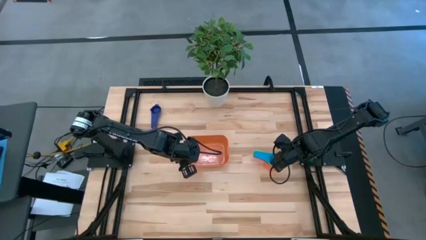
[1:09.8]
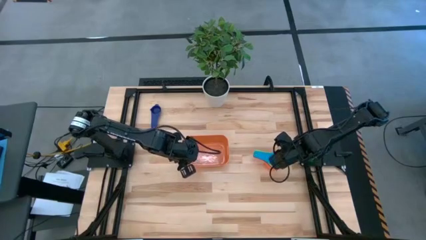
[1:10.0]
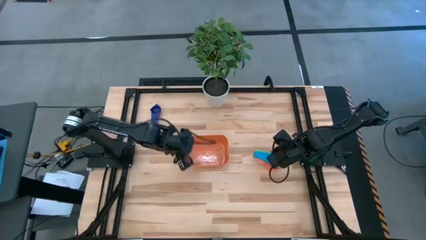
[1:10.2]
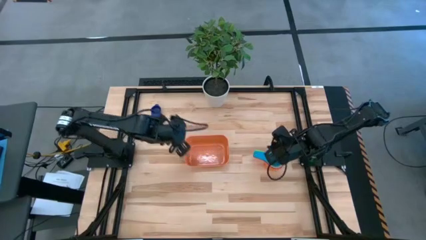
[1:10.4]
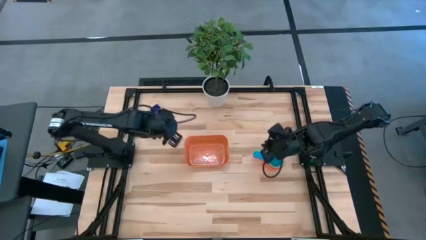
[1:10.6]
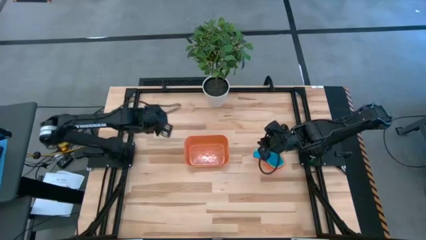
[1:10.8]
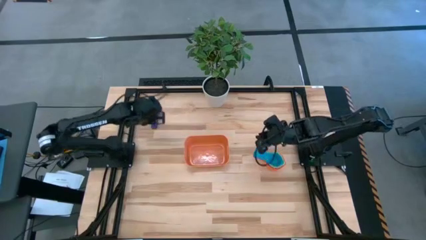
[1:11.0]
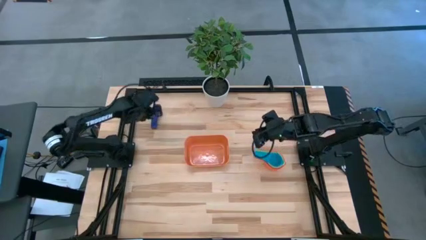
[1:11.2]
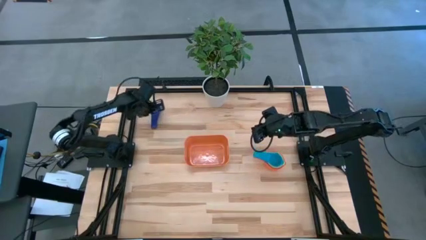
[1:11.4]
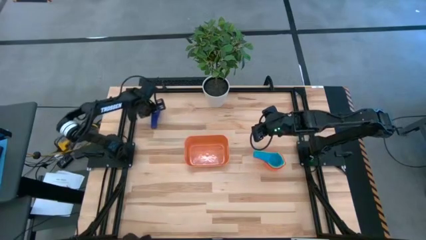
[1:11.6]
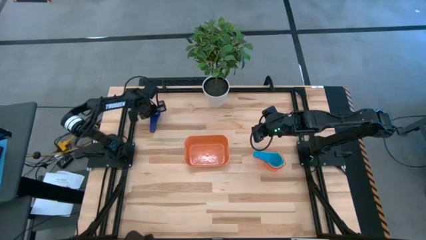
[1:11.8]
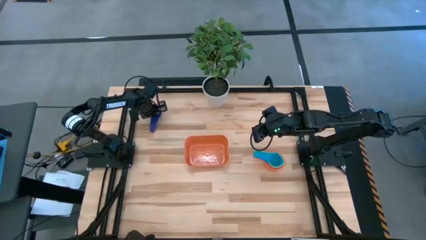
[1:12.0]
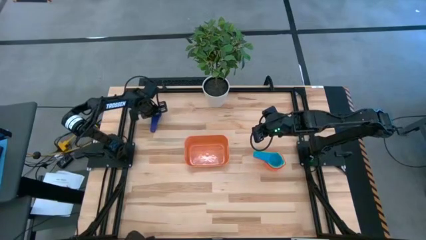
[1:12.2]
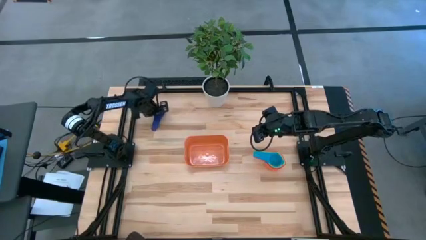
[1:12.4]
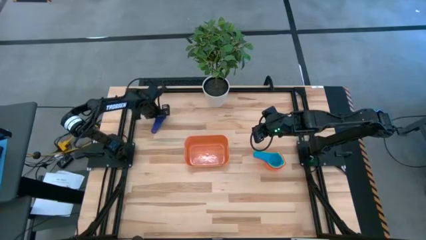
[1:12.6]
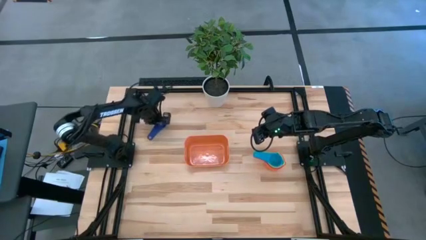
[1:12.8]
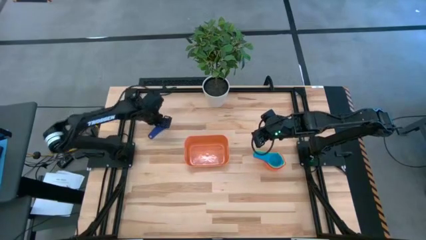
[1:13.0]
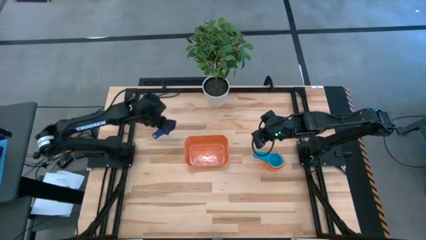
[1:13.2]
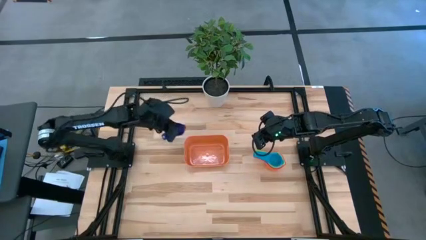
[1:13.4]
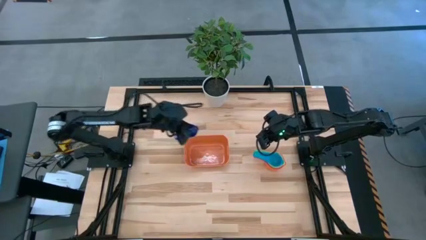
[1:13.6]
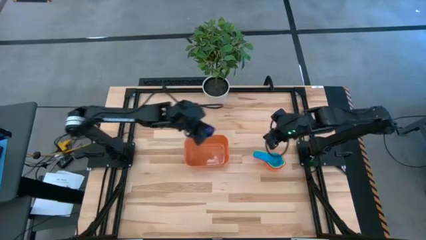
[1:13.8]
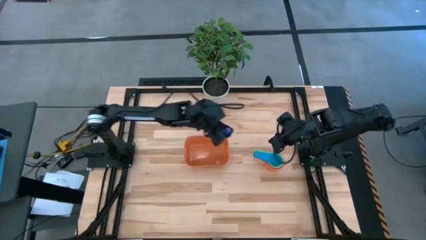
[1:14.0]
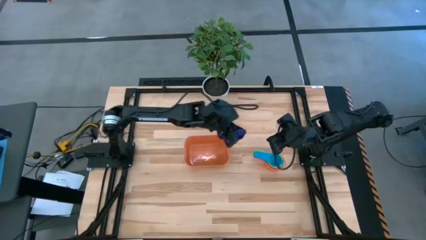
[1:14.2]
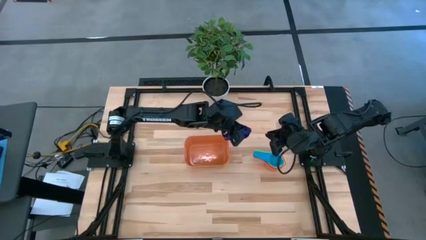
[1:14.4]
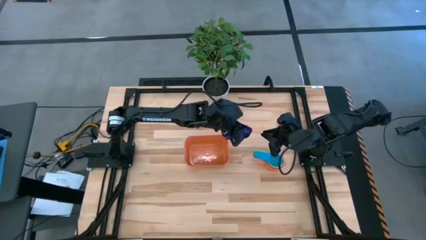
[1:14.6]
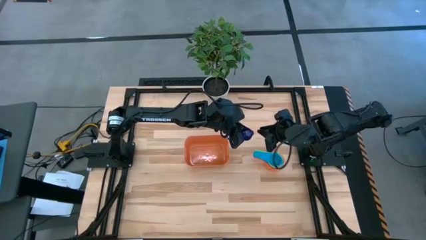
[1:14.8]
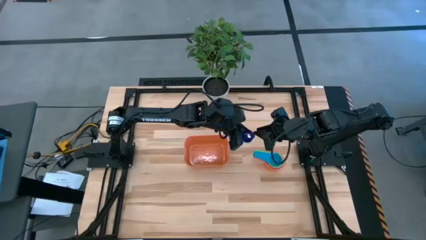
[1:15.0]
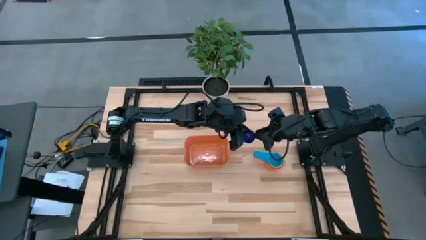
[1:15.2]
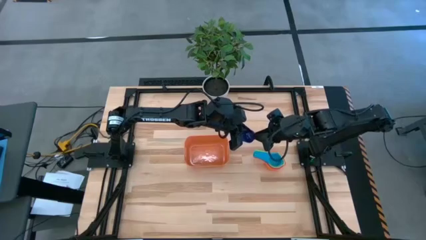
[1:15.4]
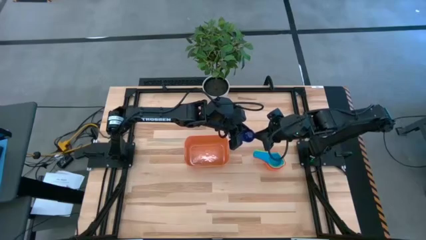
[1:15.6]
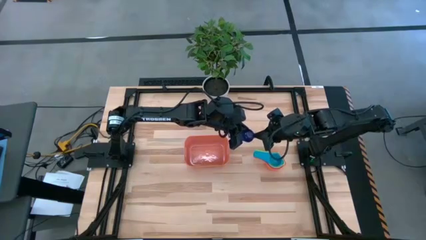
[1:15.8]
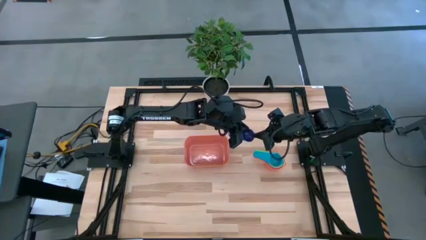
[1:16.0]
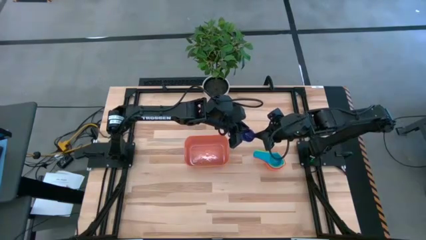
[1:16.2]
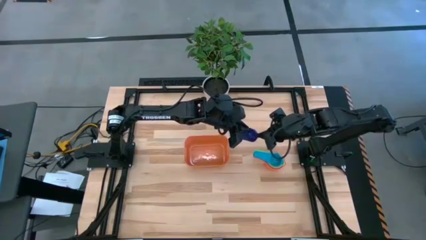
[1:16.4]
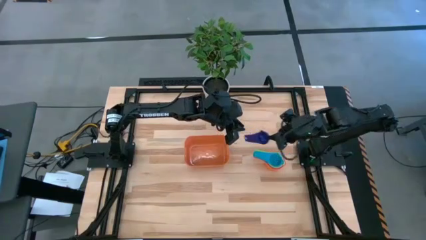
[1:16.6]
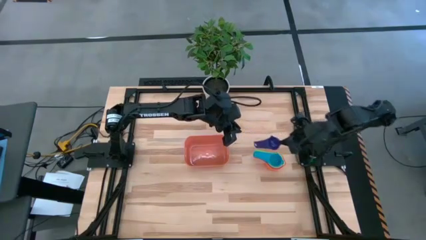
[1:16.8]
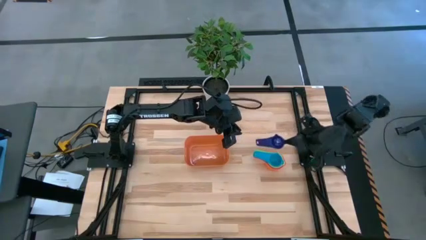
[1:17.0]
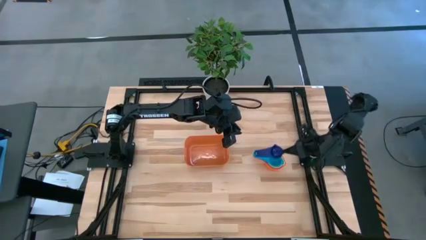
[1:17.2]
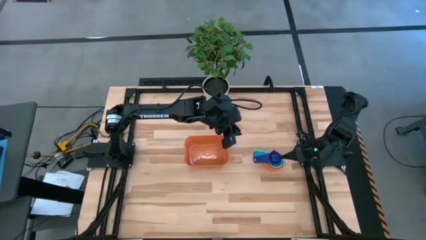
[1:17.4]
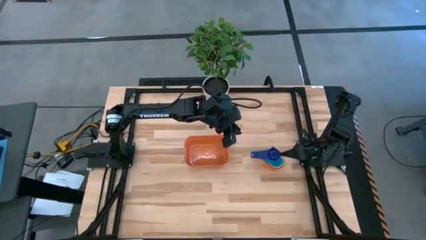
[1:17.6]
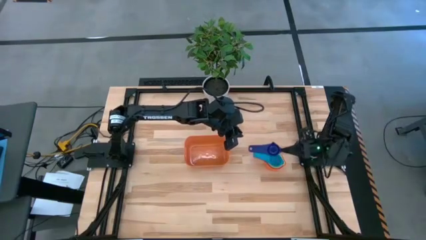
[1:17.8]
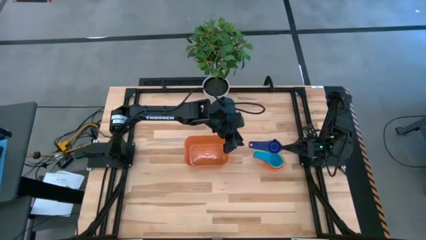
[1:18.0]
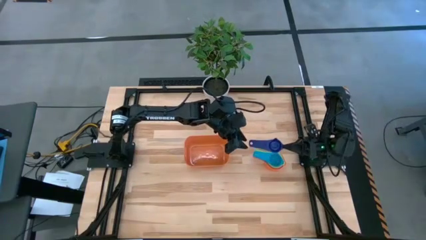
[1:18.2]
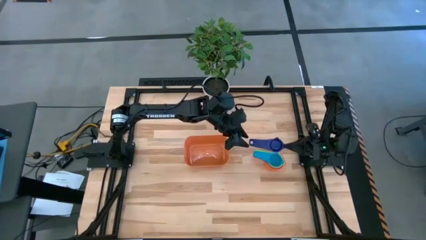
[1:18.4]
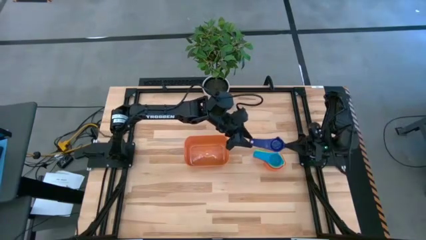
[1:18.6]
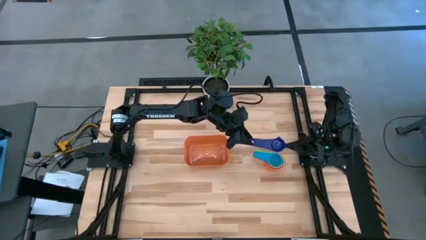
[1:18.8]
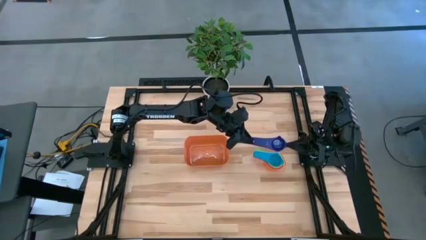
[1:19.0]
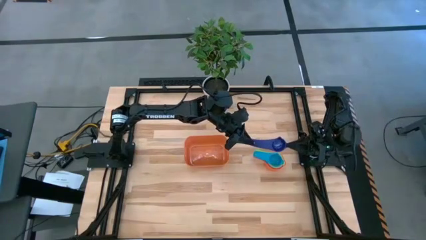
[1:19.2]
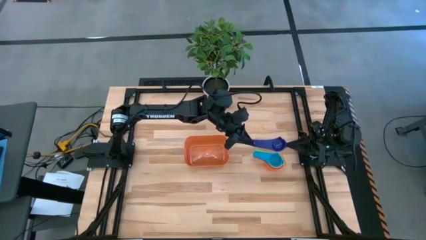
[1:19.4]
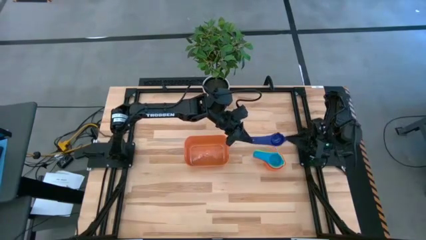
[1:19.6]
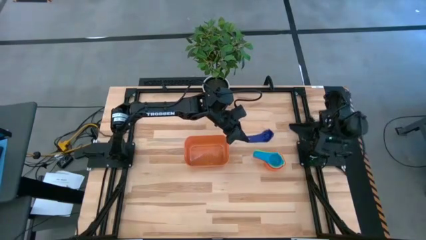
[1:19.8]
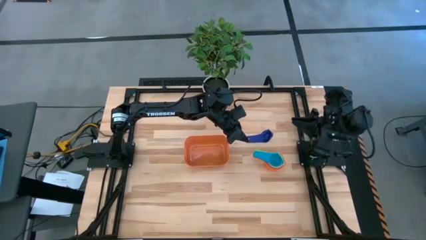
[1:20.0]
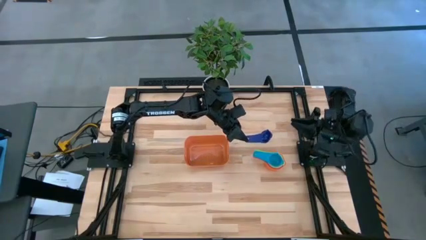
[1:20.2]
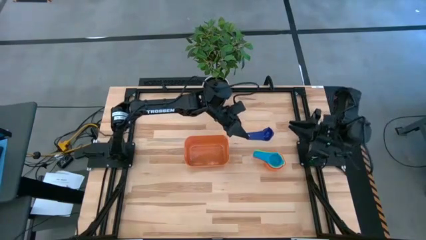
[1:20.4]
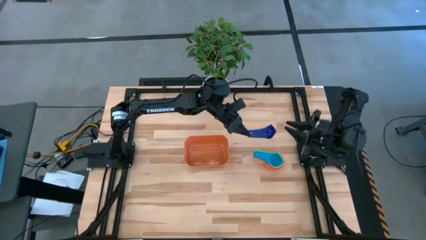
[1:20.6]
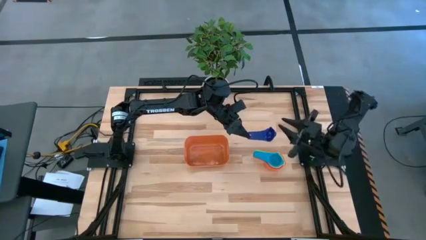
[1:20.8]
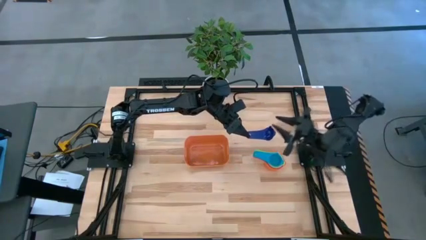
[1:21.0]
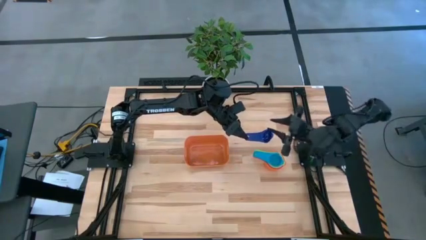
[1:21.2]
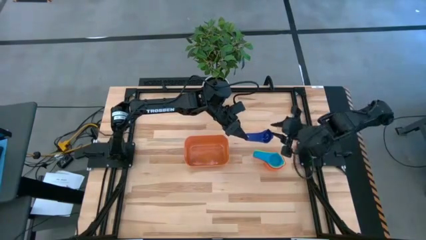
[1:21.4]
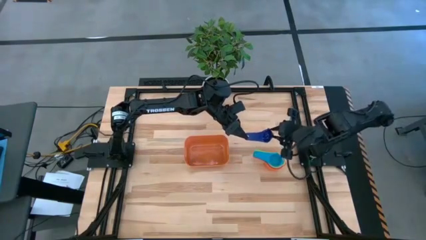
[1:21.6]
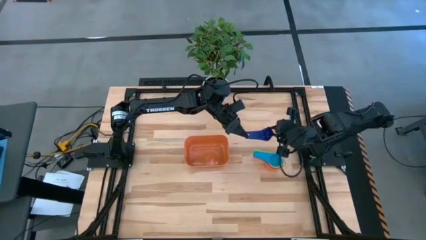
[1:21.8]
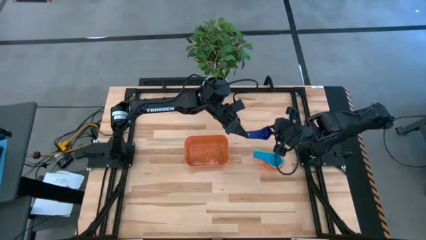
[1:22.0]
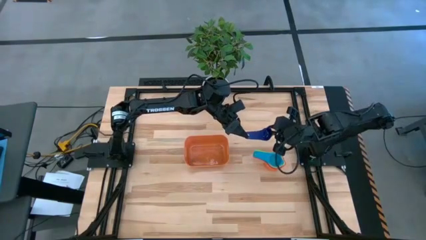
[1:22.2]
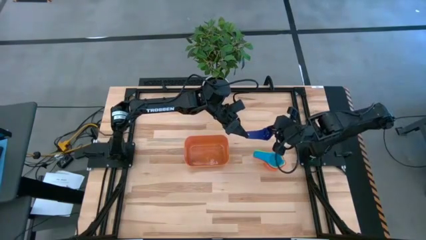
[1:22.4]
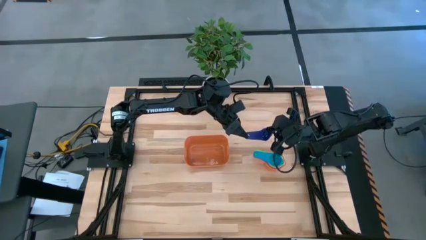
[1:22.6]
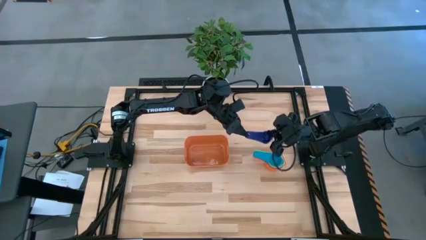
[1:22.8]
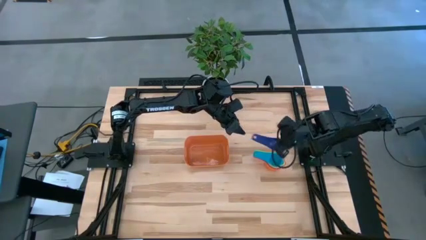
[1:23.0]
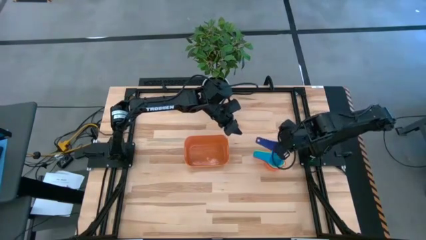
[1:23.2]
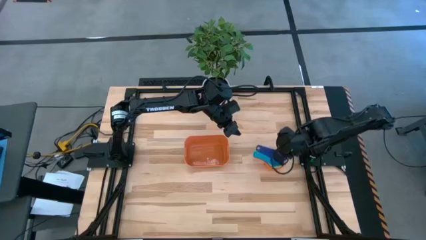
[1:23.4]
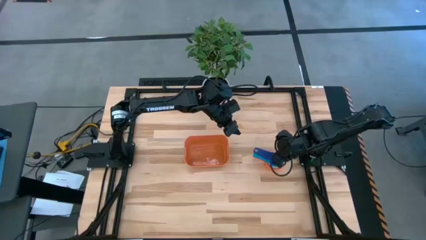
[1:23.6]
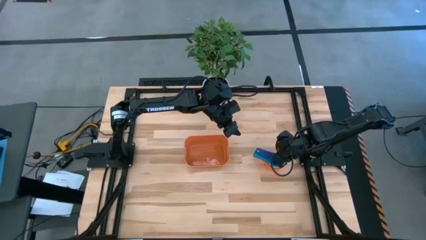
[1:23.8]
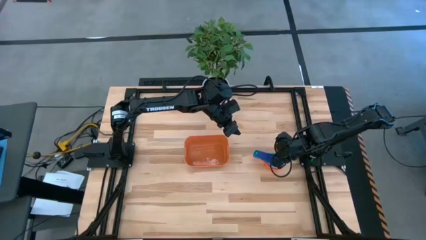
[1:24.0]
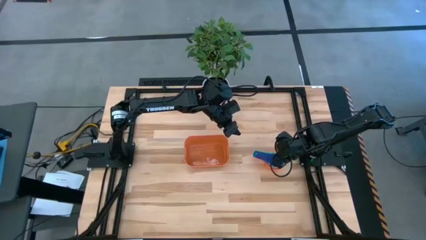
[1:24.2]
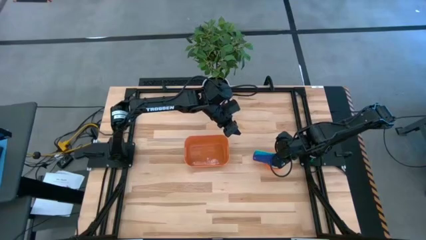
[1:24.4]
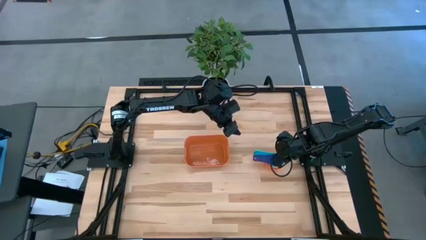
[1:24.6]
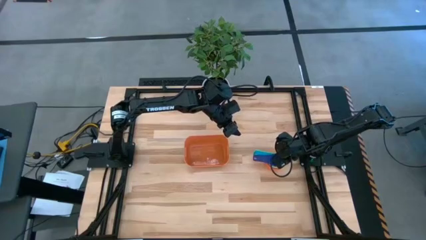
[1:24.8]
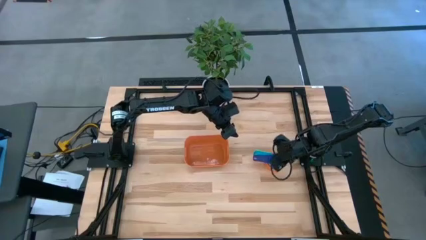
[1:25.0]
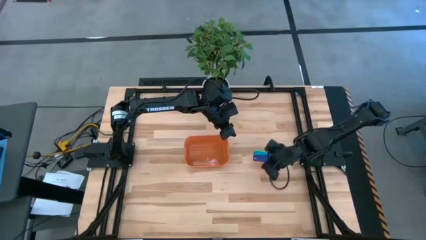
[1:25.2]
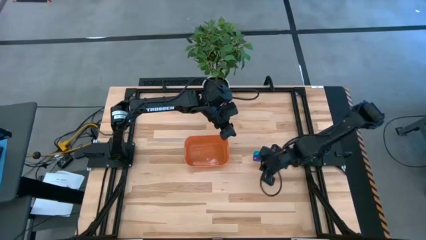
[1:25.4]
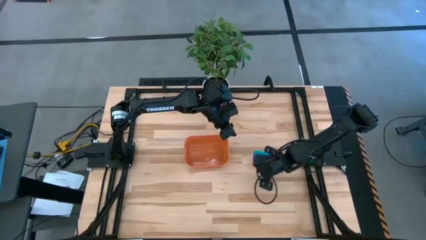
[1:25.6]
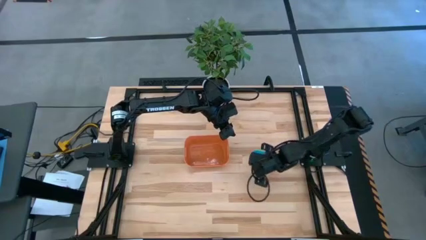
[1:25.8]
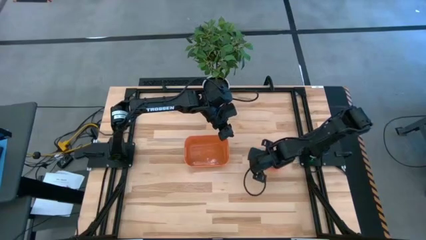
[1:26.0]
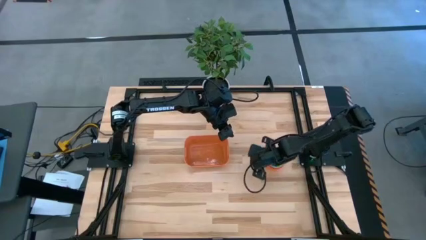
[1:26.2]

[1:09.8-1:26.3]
Task: Nest measuring cups in basket
Stack the purple measuring cup on top of the light blue measuring cup
